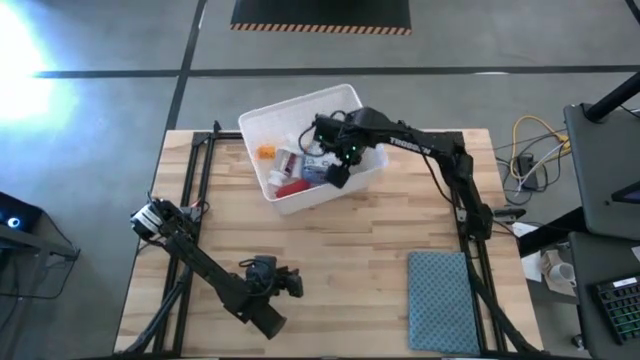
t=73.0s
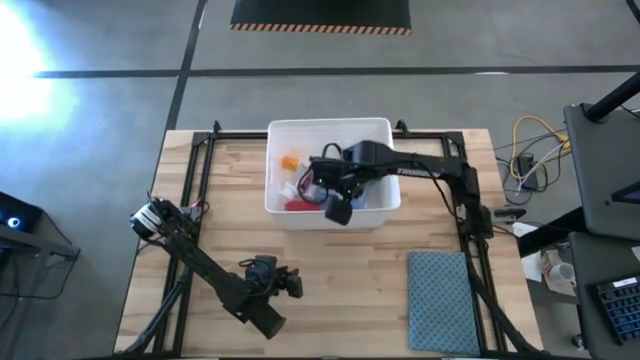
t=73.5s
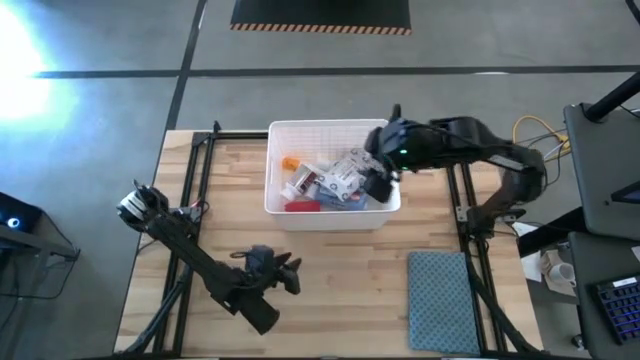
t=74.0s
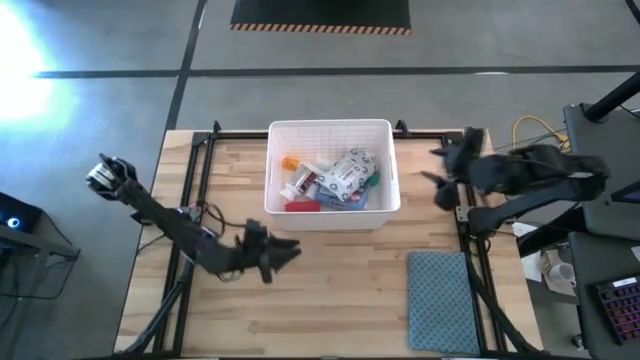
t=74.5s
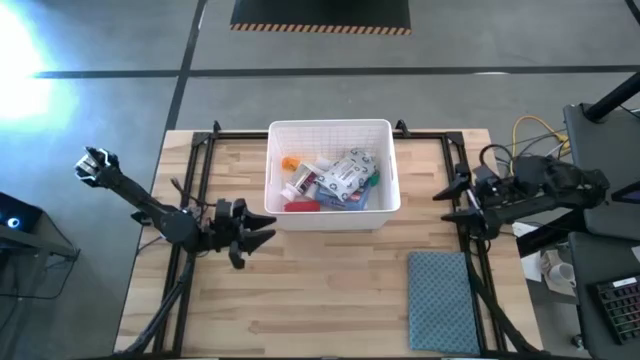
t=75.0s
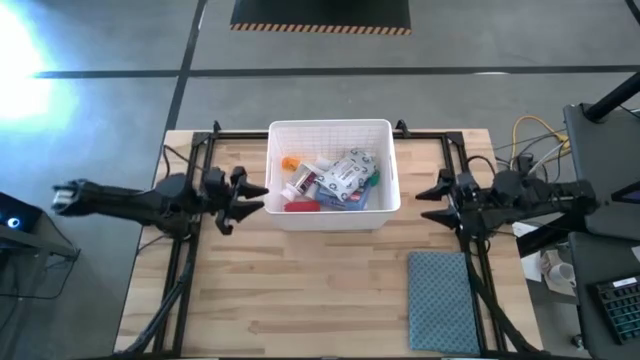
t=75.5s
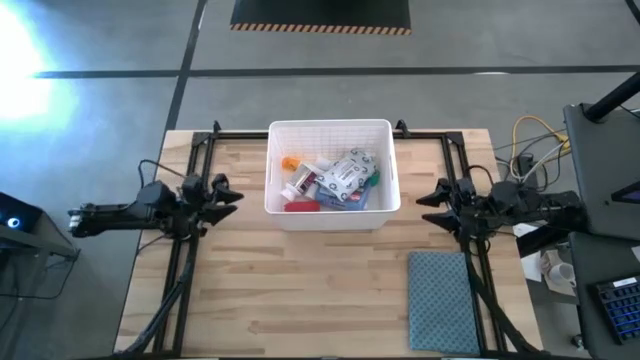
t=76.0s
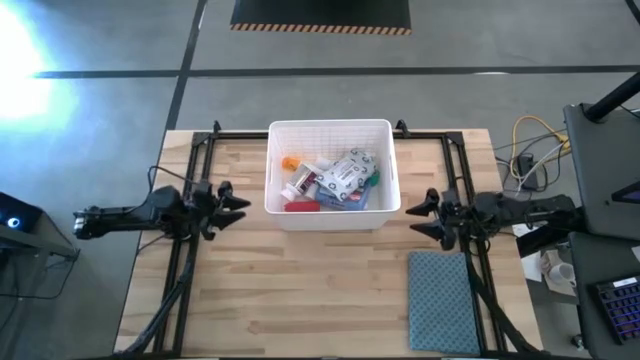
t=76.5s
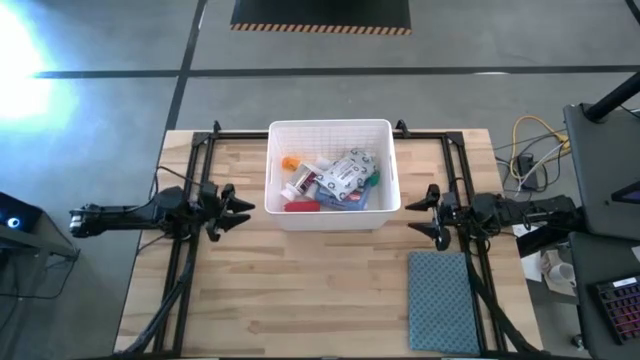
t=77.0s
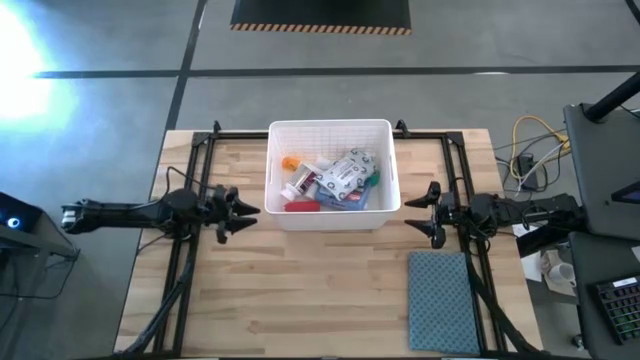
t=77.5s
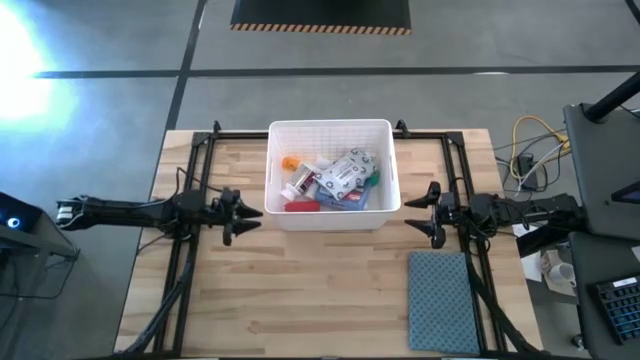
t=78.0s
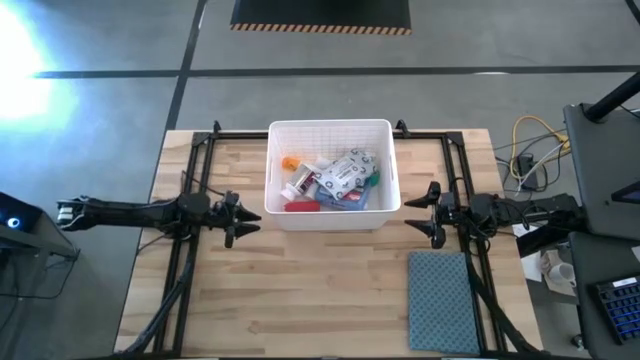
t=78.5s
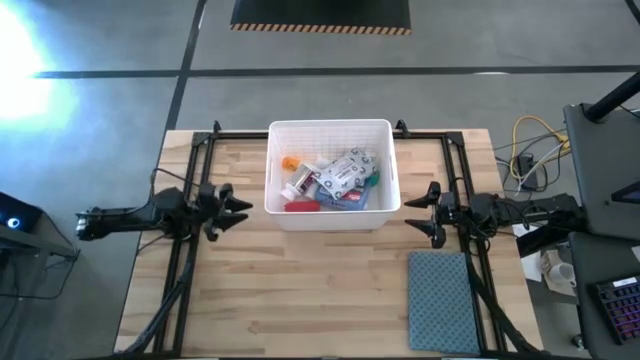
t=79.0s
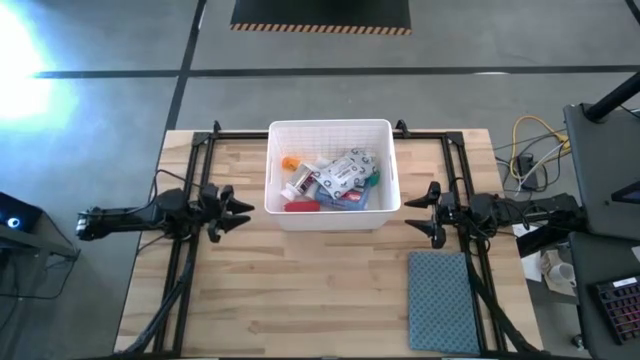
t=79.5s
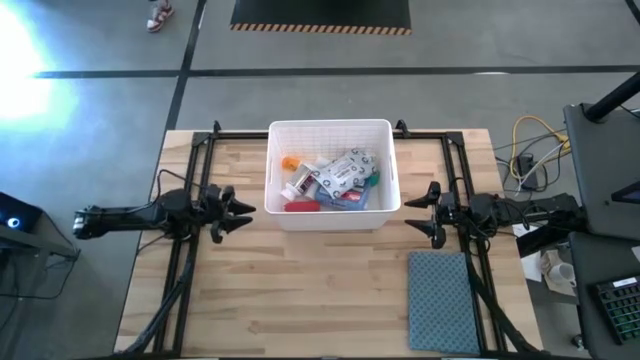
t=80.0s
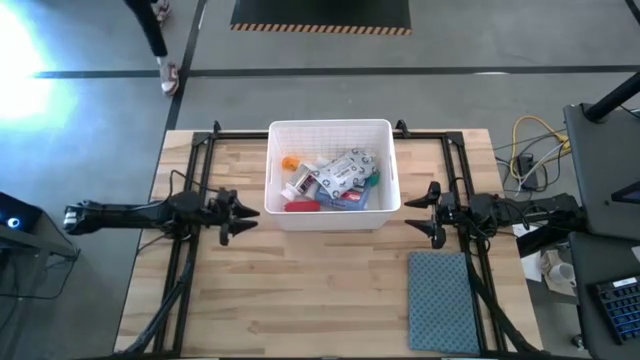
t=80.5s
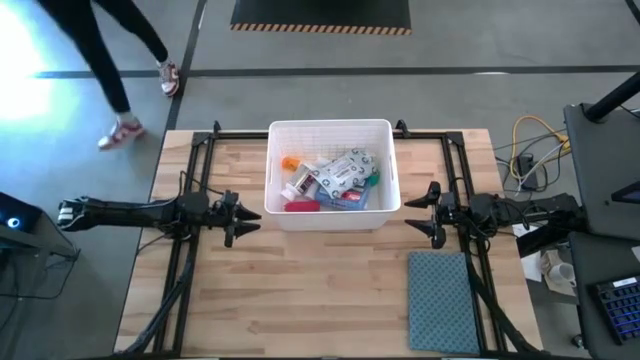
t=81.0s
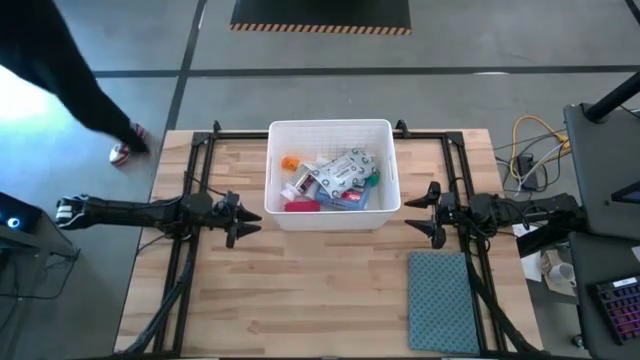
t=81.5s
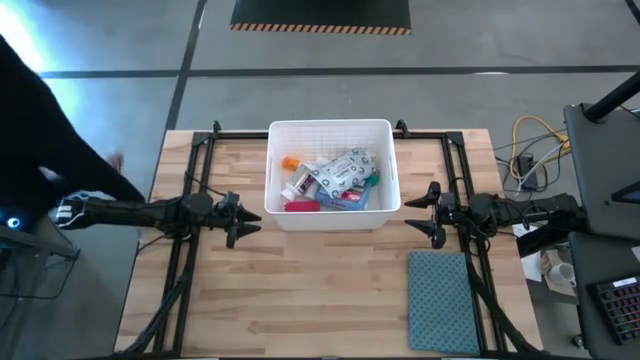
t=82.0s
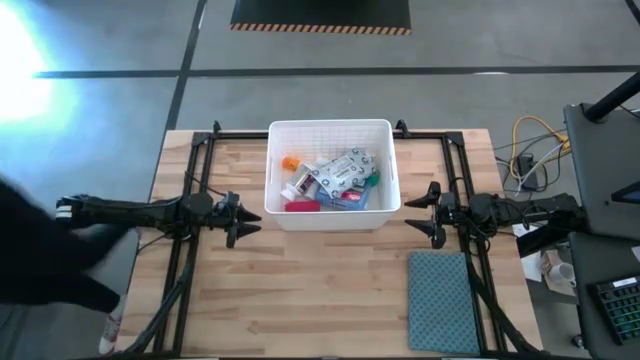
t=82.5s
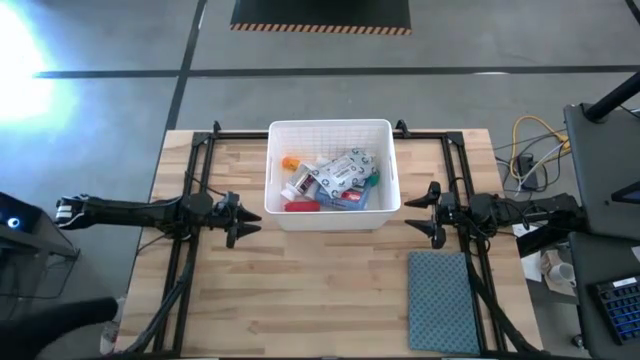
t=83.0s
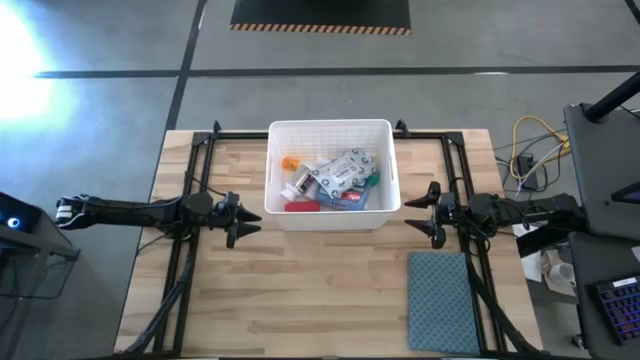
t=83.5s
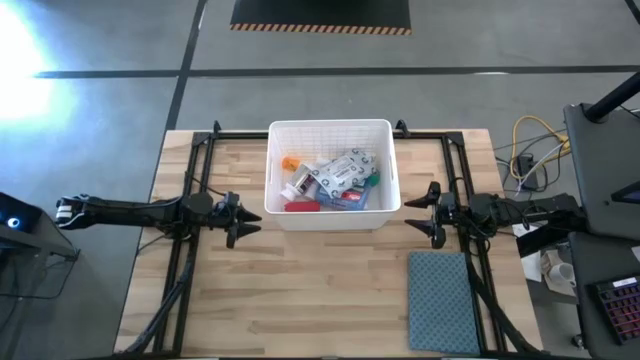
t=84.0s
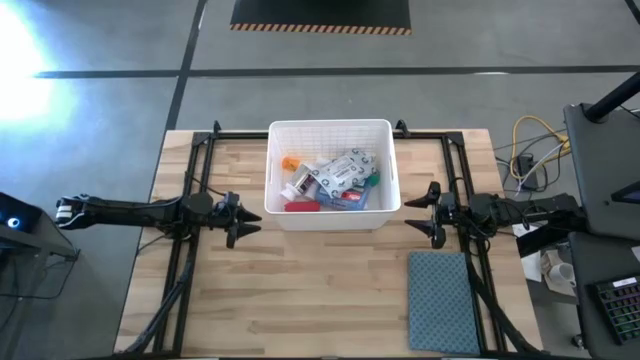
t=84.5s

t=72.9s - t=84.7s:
Task: Pick & place medical supplies in basket/bin
Return to Home Position

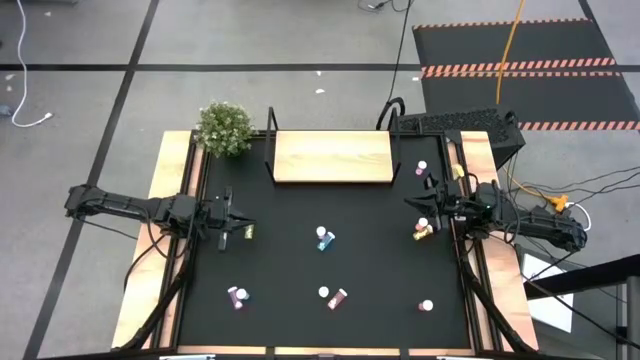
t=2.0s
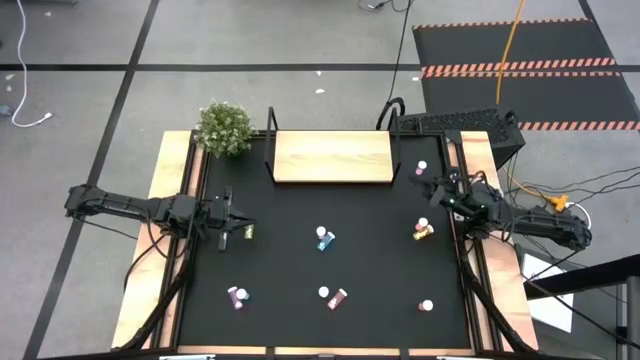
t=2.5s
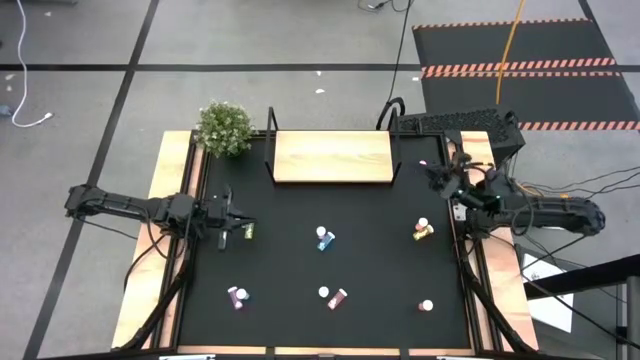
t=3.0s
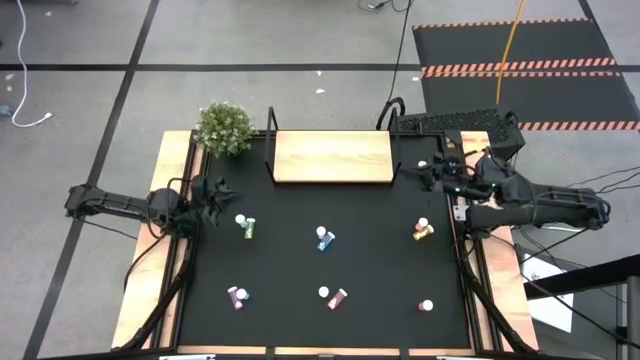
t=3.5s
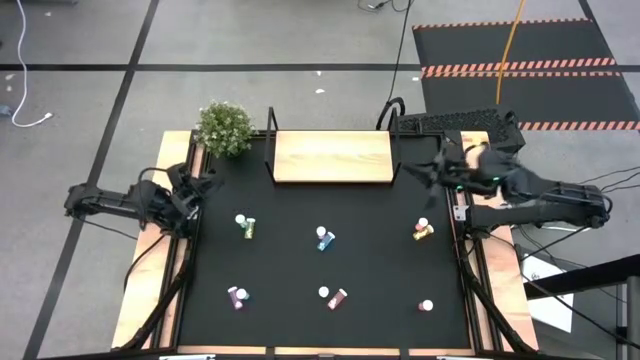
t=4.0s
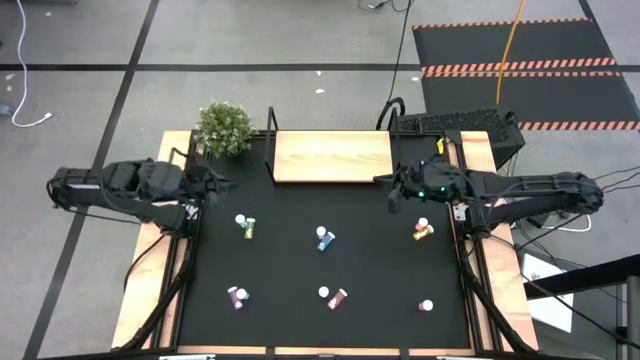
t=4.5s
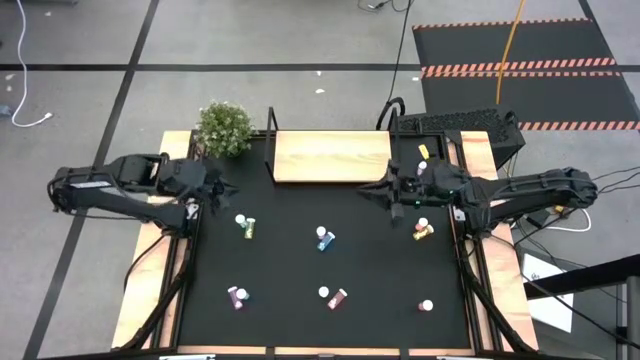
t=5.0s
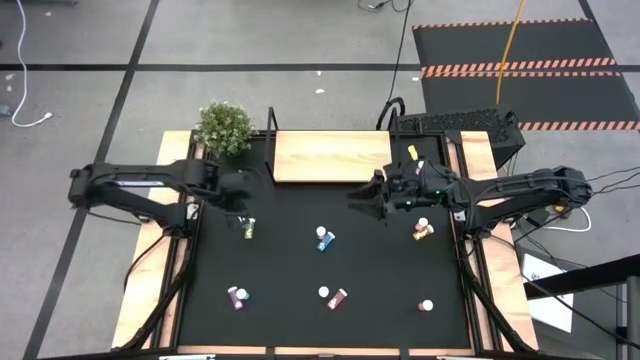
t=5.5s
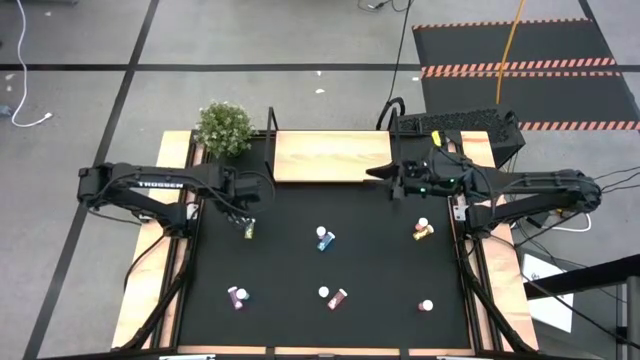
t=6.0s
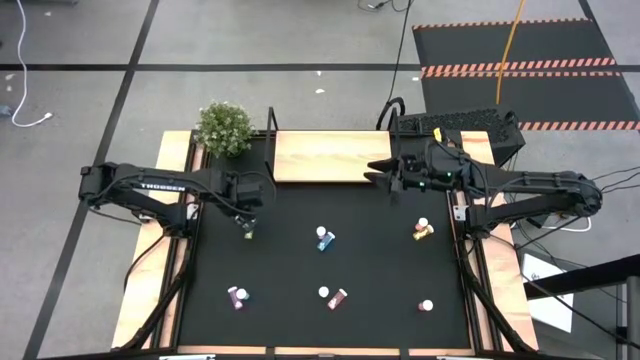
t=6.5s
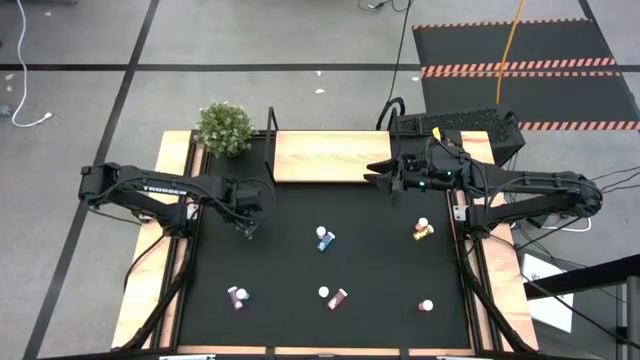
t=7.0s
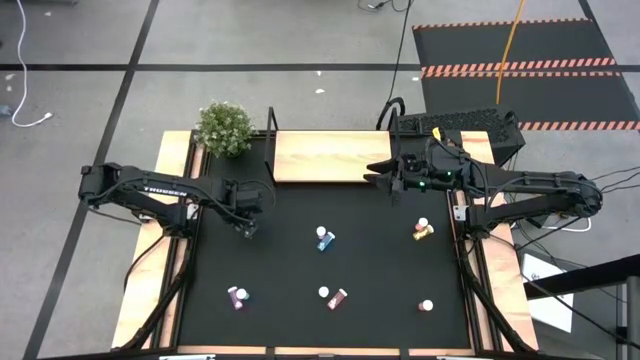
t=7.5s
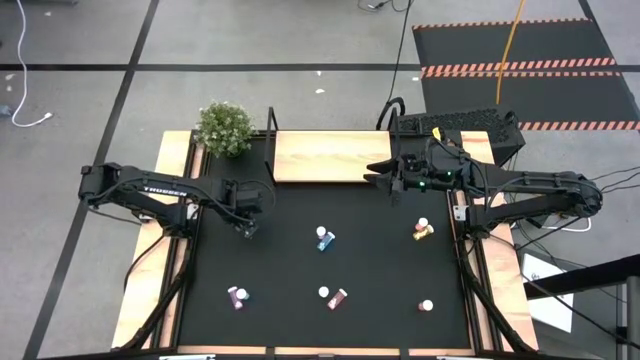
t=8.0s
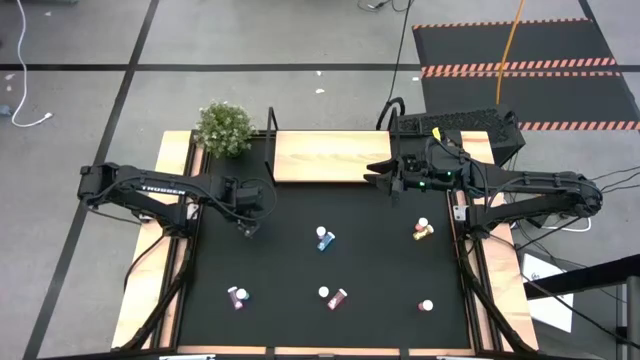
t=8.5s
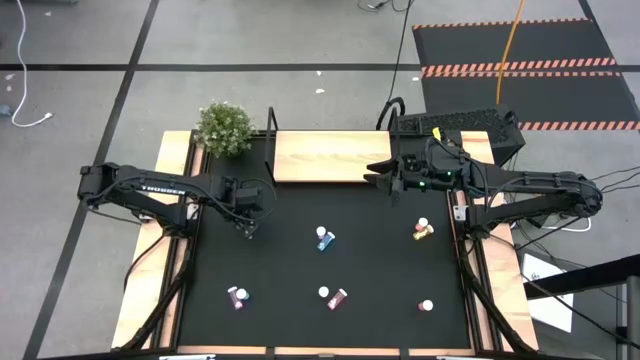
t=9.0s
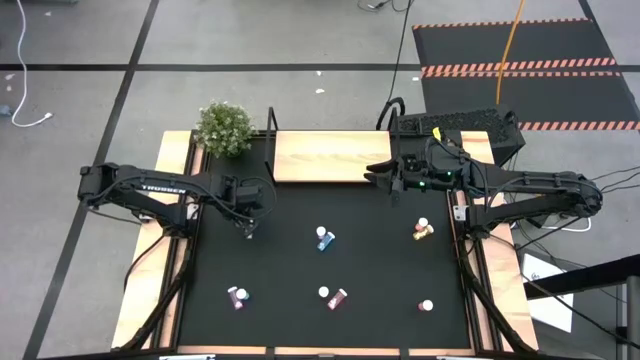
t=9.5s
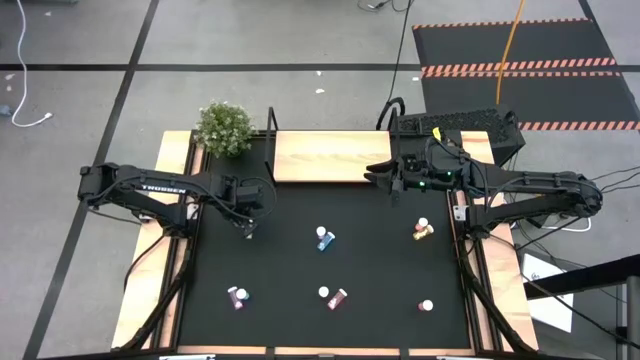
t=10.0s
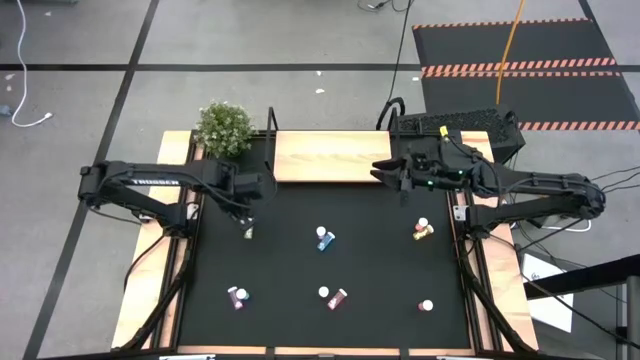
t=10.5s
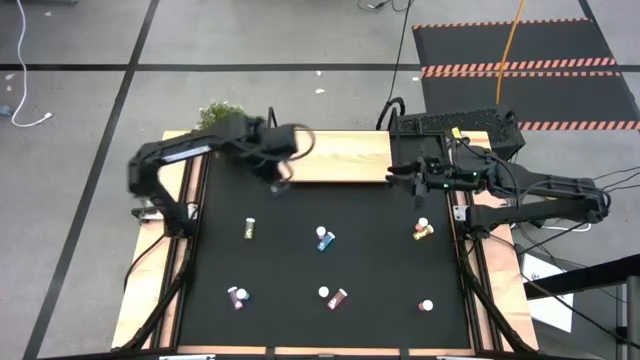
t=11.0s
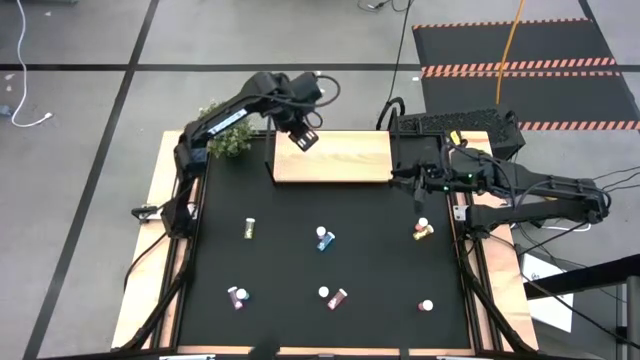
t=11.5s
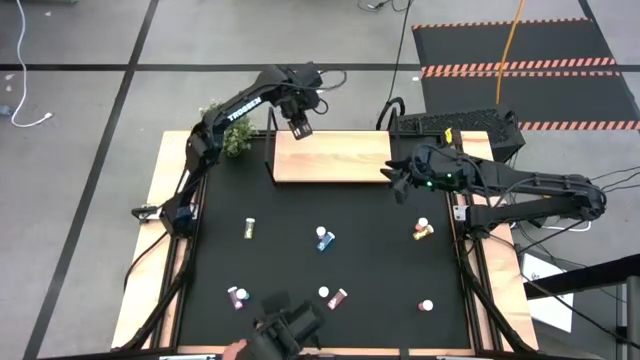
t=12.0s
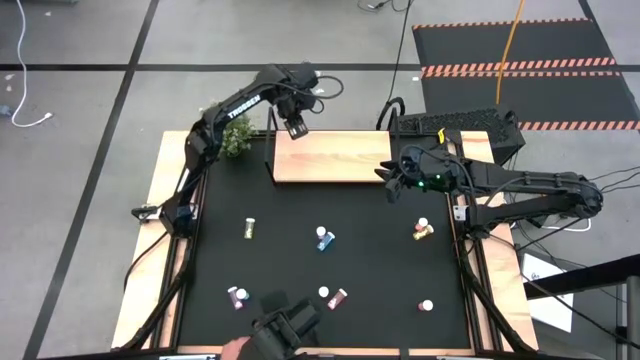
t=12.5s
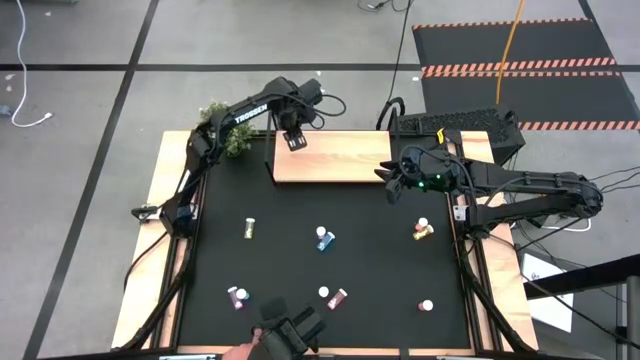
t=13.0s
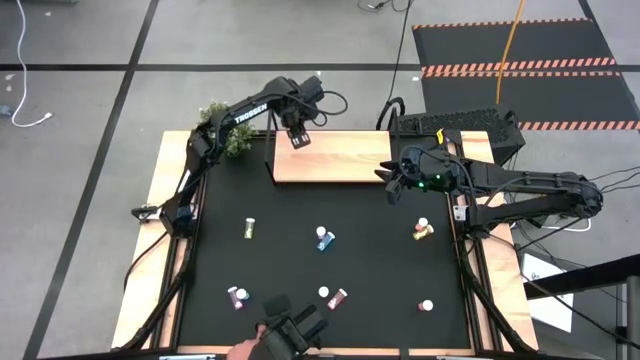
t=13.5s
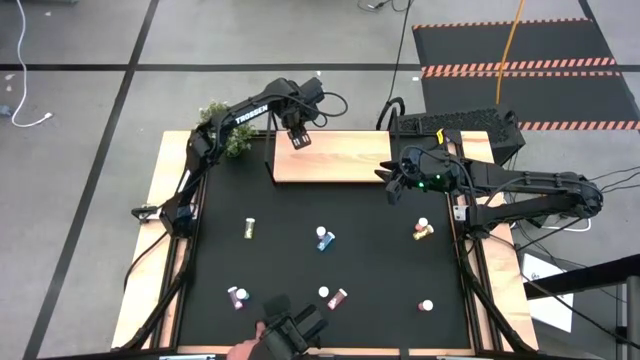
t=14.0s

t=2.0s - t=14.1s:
Task: Pick and place medicine bottles onto shelf by color
Put the top left blue pill bottle on the shelf
